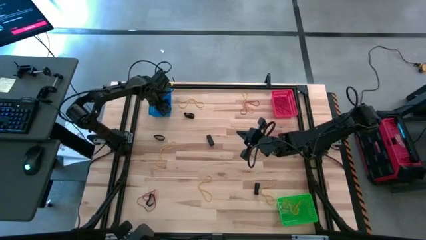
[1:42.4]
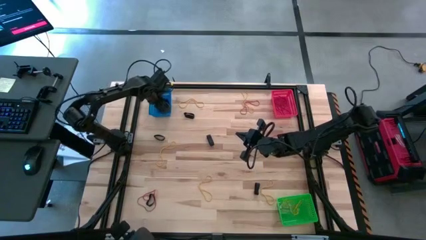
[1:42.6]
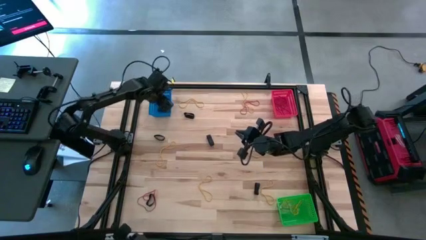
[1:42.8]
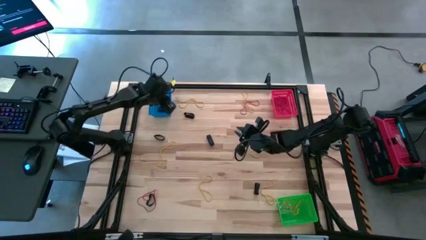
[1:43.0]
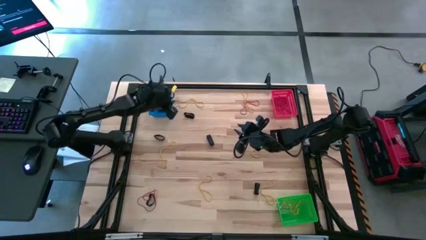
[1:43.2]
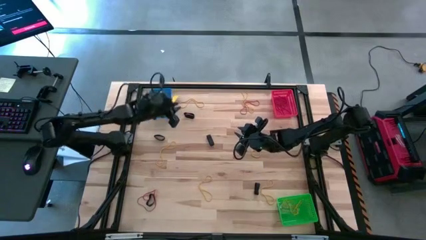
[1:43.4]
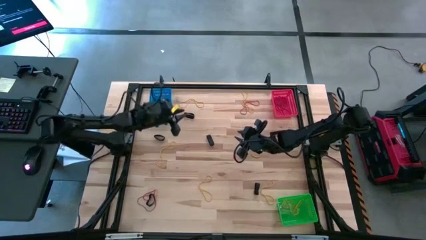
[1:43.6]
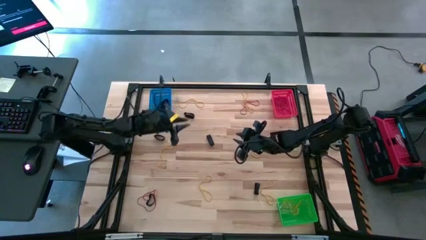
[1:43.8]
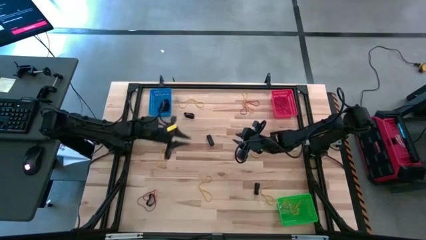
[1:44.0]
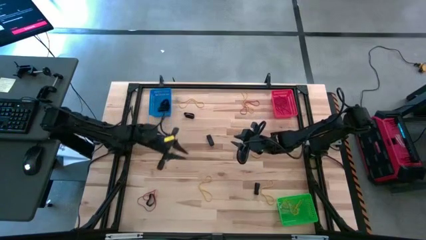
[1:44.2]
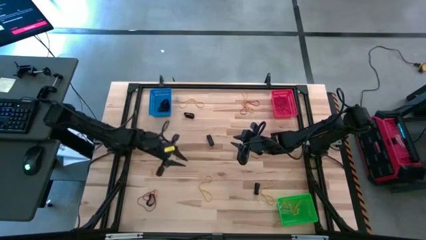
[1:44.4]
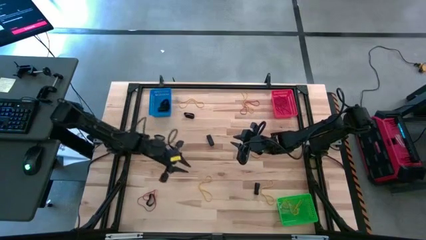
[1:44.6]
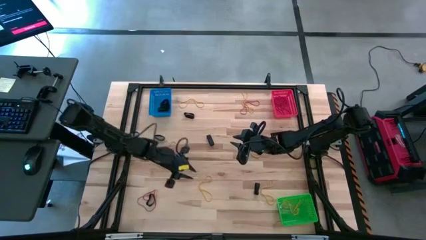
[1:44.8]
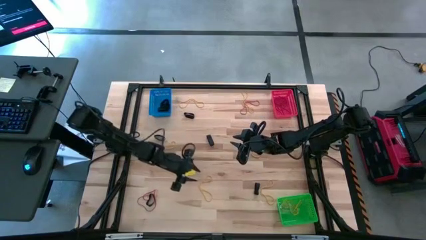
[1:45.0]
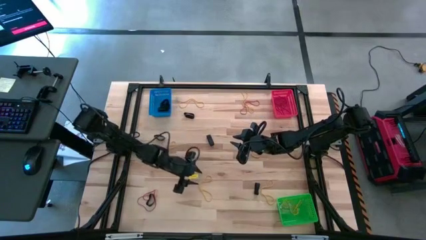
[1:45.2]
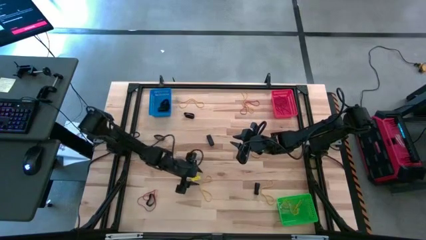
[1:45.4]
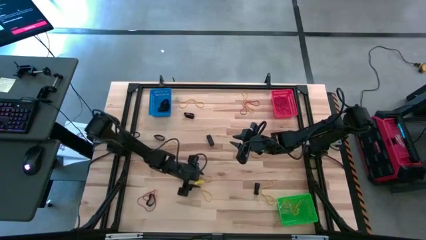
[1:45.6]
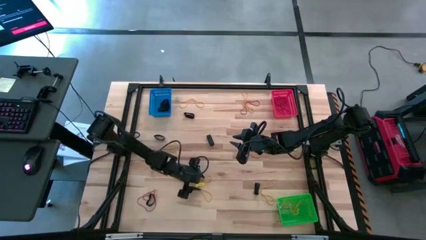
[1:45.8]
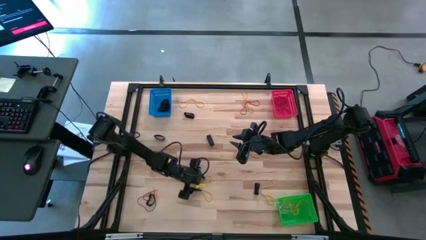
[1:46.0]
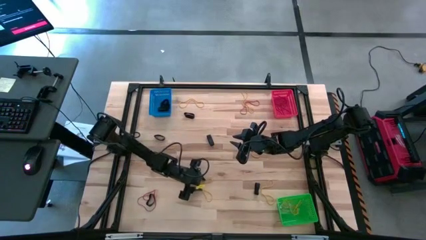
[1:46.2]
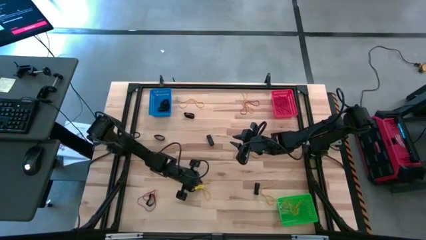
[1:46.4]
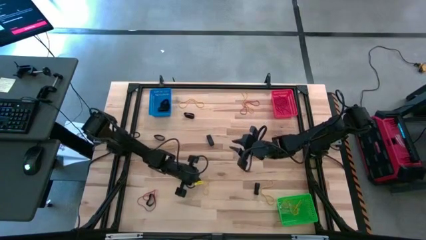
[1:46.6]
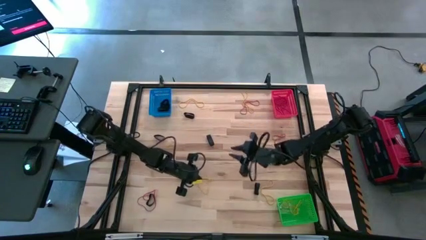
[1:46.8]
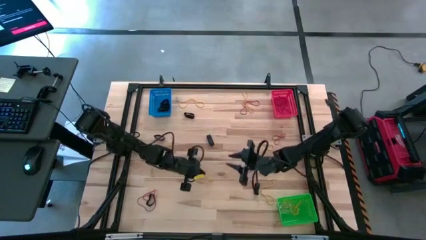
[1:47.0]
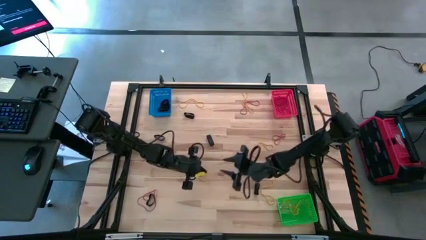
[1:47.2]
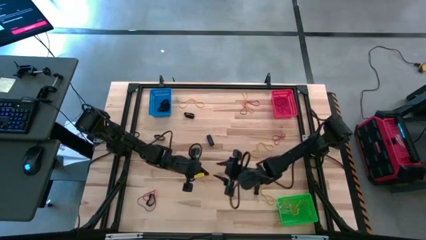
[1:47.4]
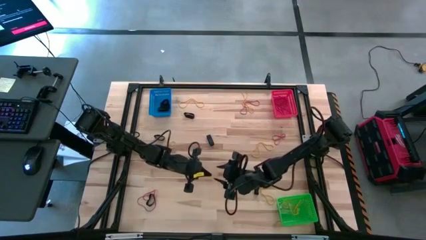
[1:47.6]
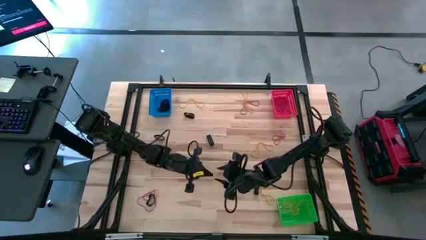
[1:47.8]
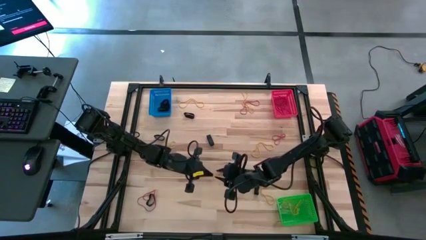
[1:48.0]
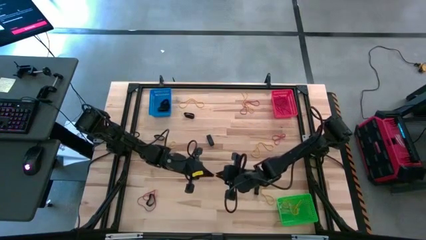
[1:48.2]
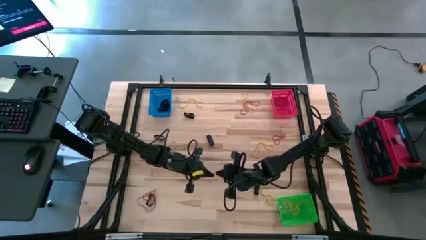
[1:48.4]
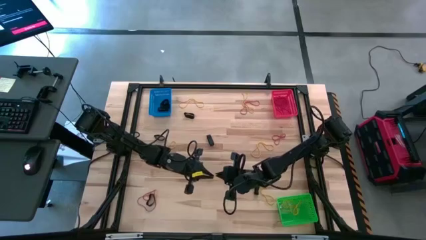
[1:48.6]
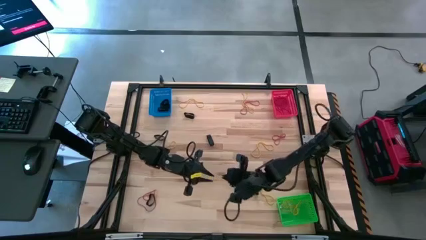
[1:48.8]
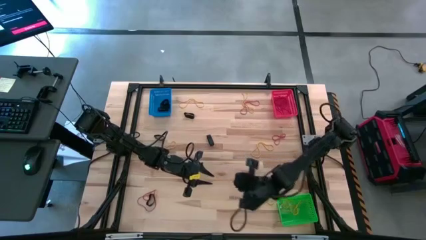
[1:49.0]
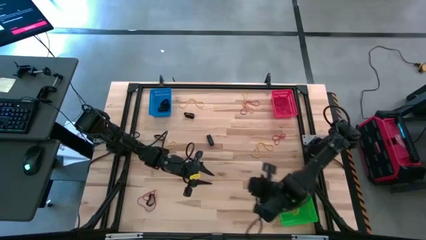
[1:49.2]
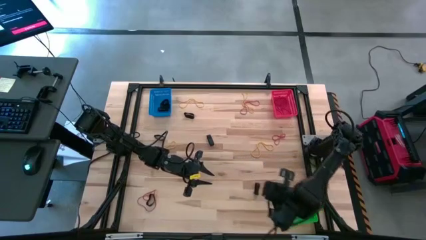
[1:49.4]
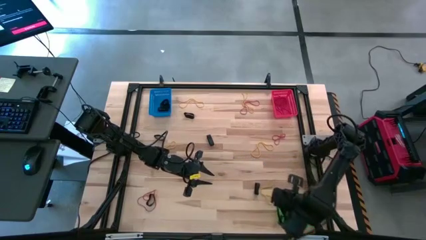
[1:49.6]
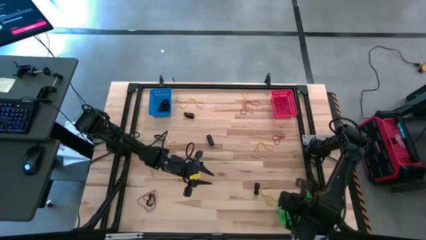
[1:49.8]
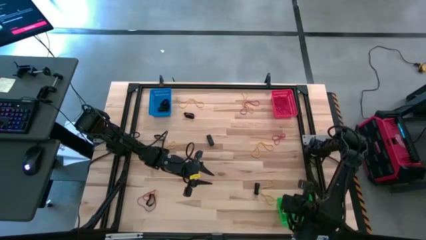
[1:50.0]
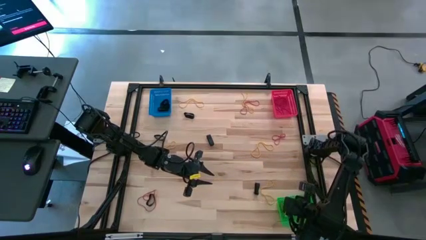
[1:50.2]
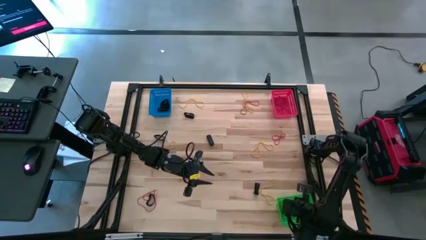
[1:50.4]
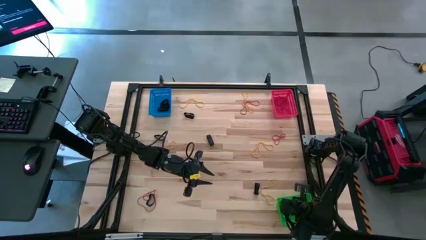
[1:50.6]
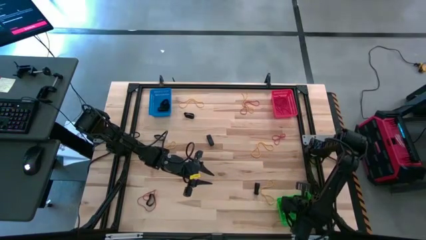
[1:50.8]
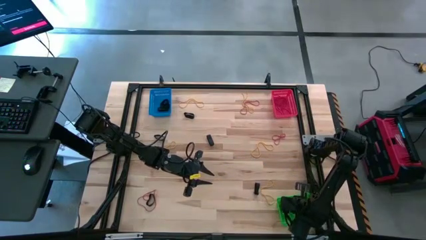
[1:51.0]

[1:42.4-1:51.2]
Task: Sort rubber bands into baskets
Put the yellow rubber band into the green bin

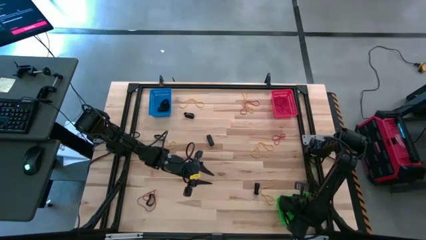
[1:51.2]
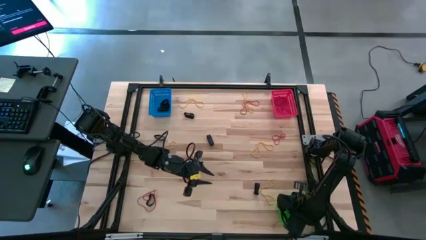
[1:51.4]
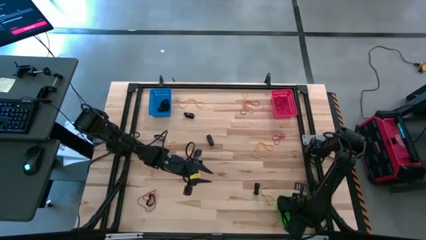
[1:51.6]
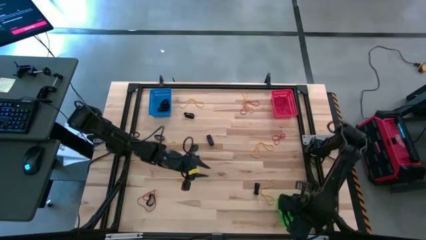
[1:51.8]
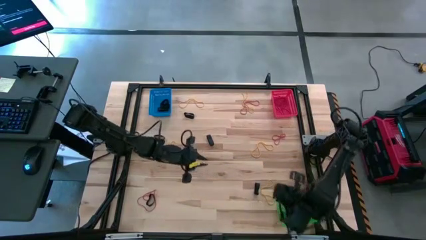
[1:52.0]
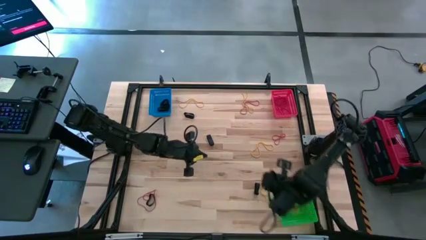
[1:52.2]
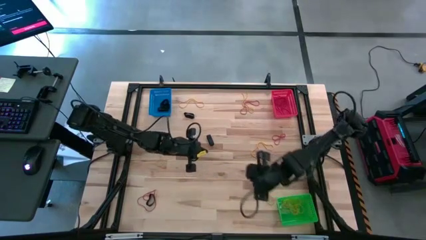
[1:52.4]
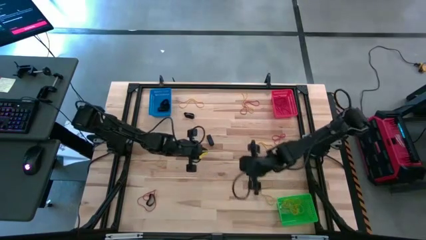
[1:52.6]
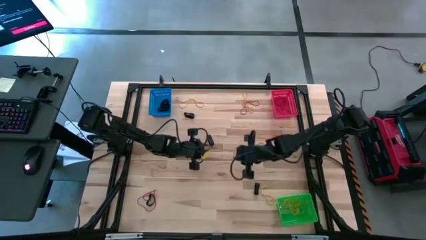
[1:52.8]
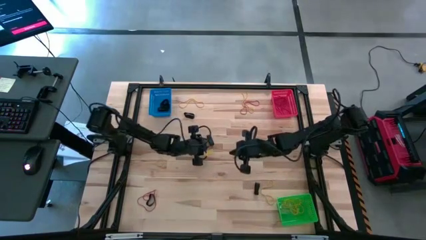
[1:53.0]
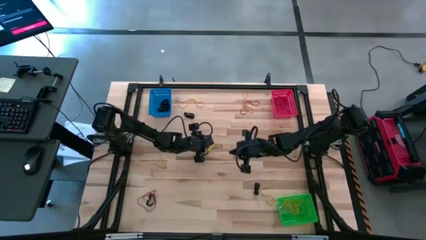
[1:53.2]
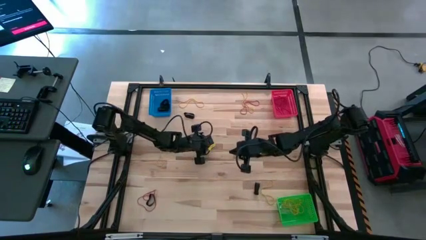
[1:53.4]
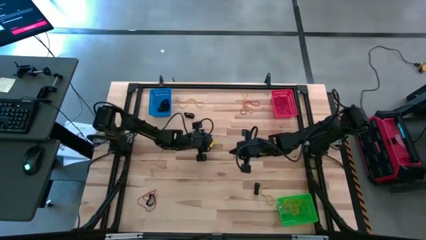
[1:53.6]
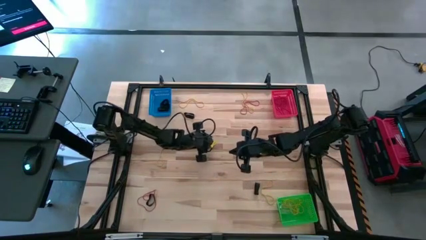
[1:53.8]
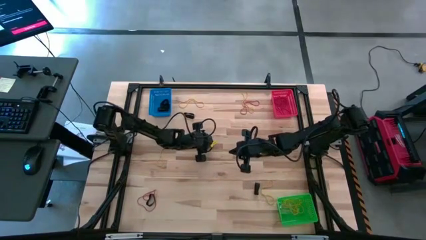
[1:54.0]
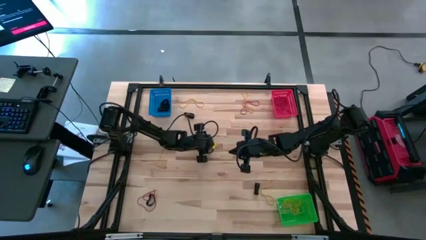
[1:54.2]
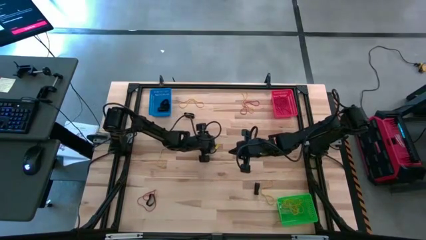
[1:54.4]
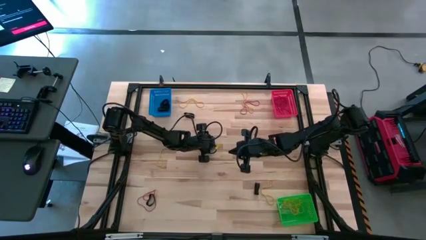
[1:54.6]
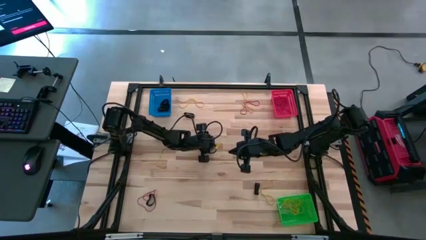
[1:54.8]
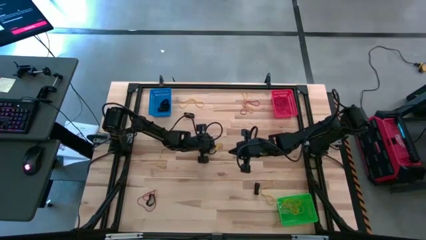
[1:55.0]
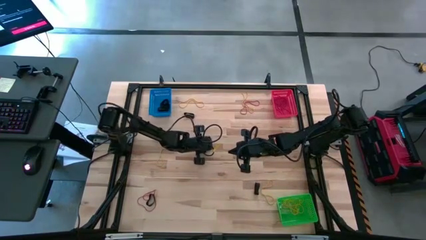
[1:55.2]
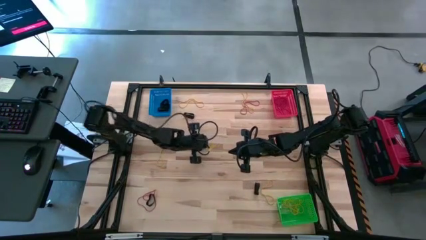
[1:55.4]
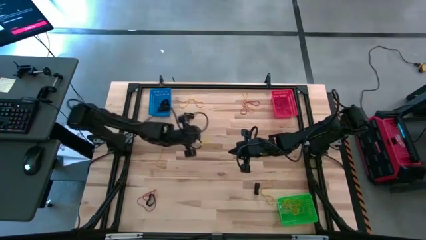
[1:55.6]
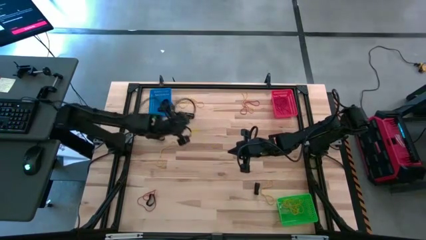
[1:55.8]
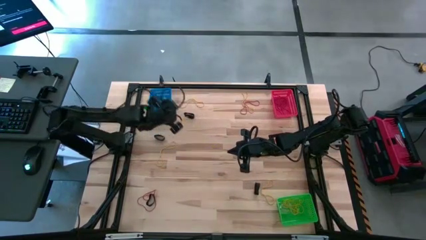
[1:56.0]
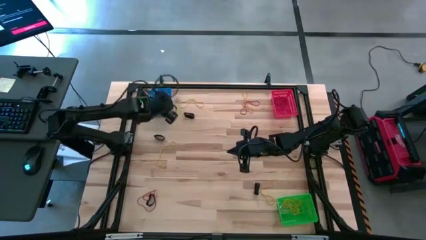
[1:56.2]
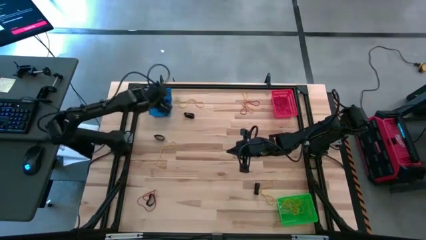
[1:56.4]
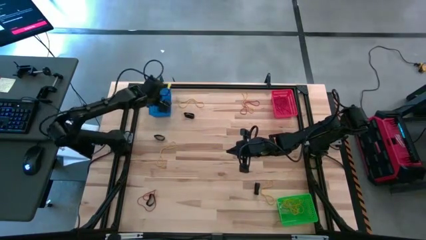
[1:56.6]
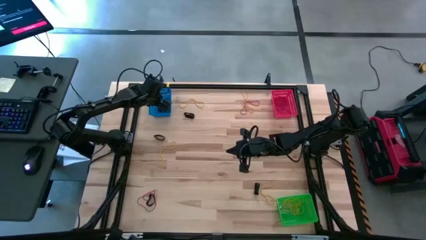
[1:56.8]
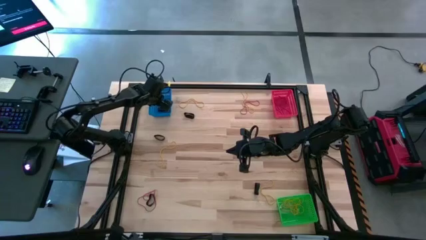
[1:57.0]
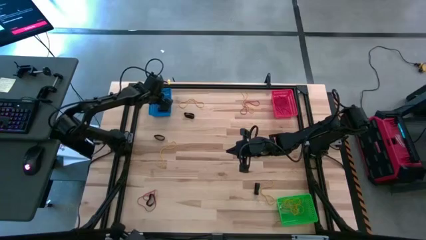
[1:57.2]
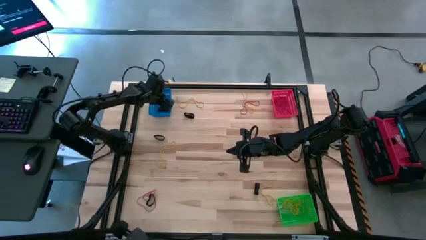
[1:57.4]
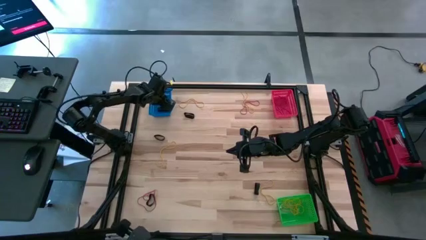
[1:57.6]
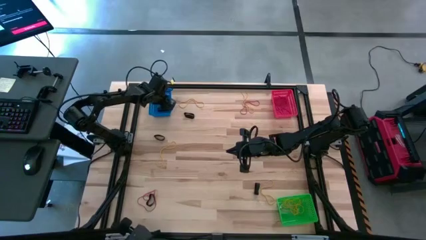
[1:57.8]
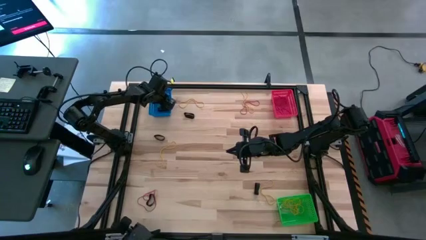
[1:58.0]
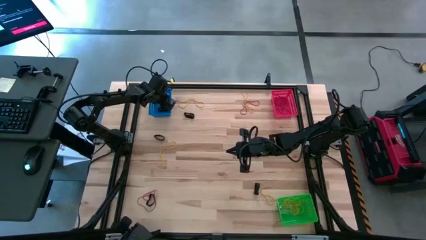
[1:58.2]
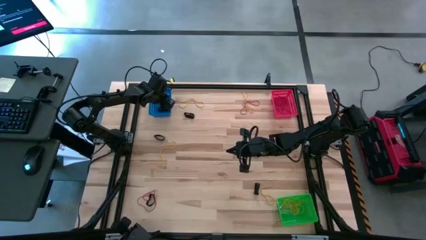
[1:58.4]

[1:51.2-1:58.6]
Put the black rubber band into the blue bin
